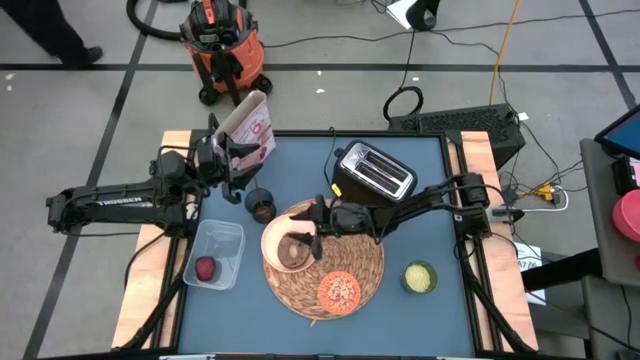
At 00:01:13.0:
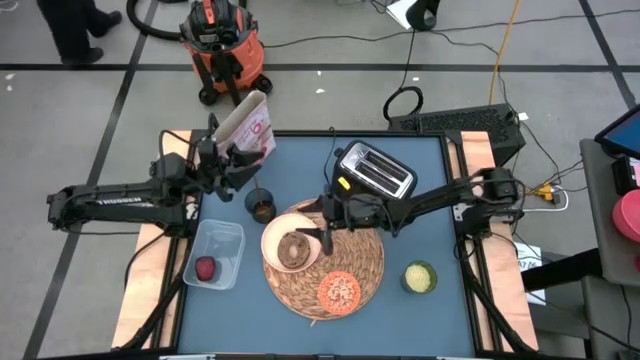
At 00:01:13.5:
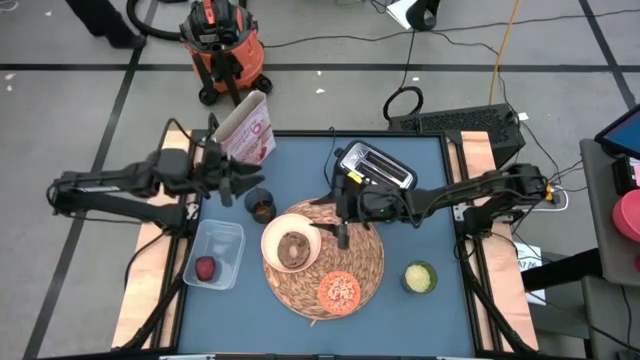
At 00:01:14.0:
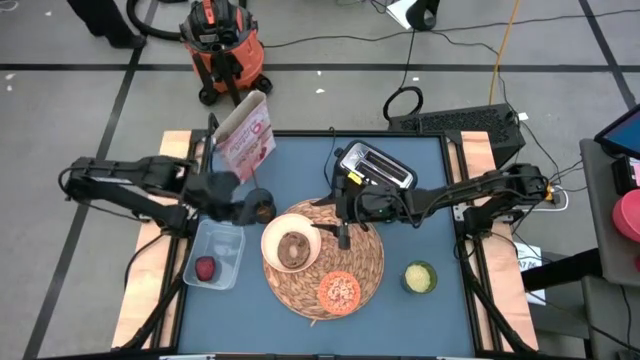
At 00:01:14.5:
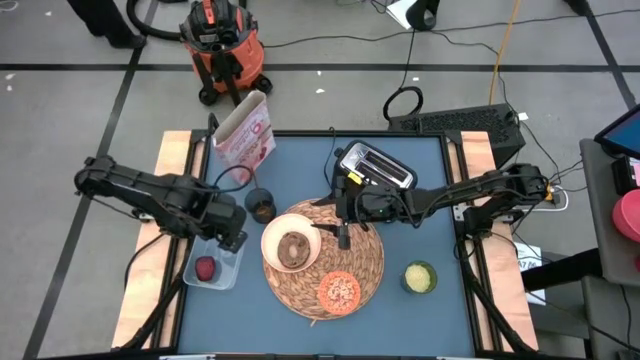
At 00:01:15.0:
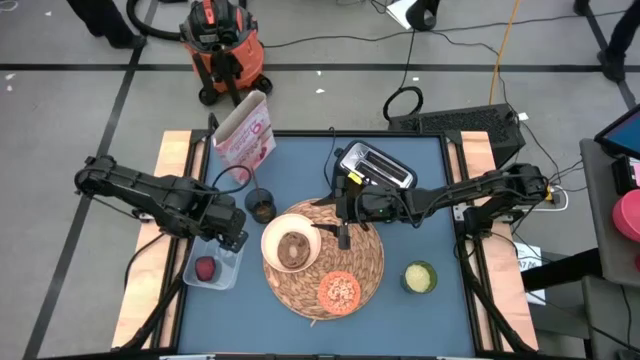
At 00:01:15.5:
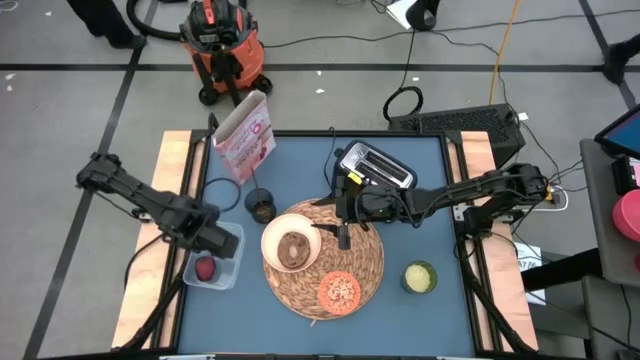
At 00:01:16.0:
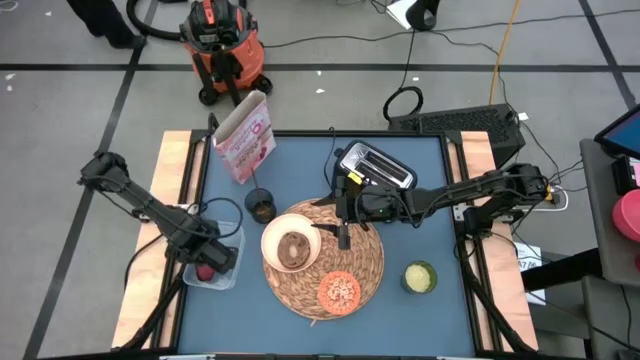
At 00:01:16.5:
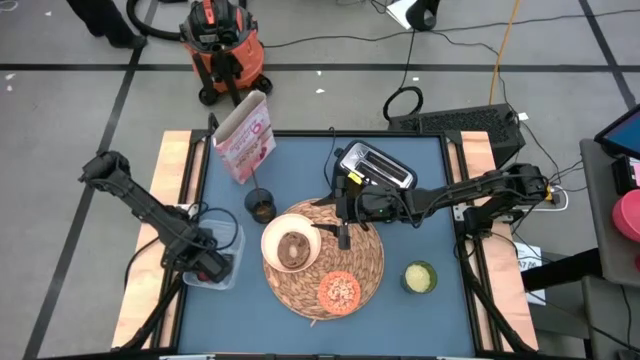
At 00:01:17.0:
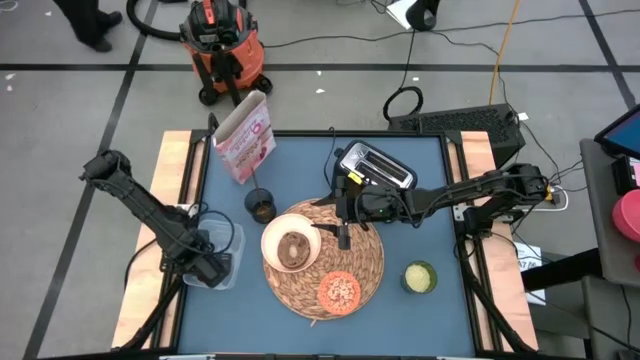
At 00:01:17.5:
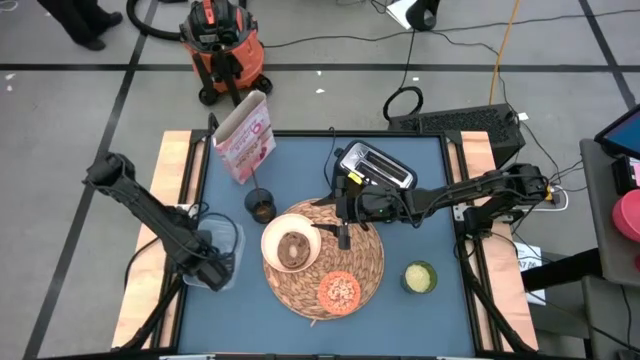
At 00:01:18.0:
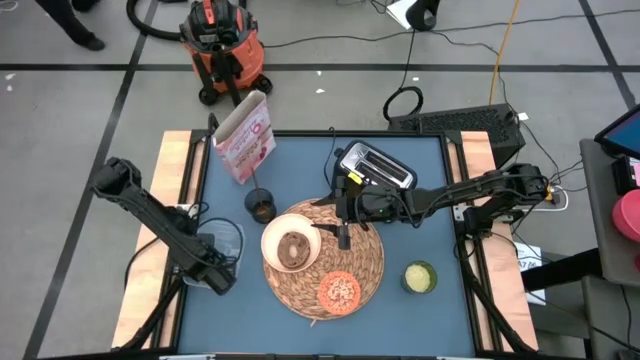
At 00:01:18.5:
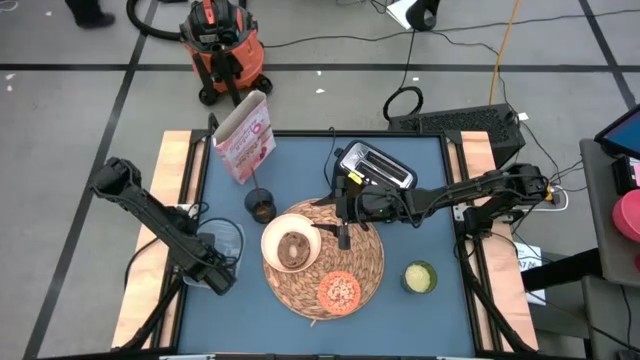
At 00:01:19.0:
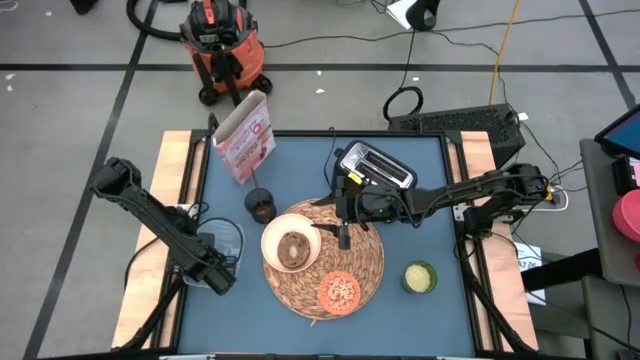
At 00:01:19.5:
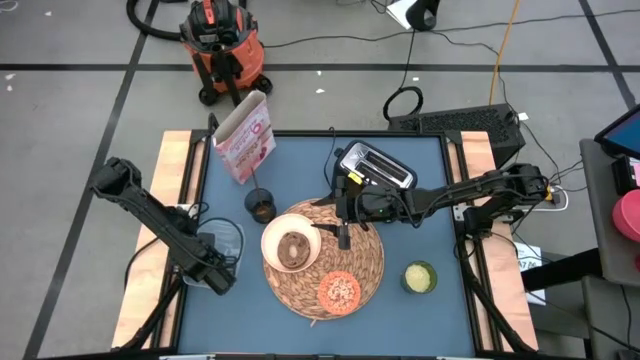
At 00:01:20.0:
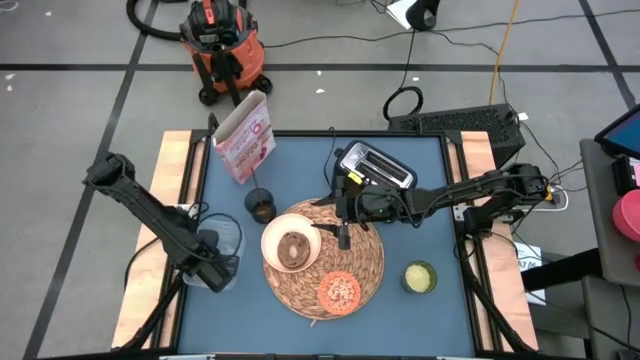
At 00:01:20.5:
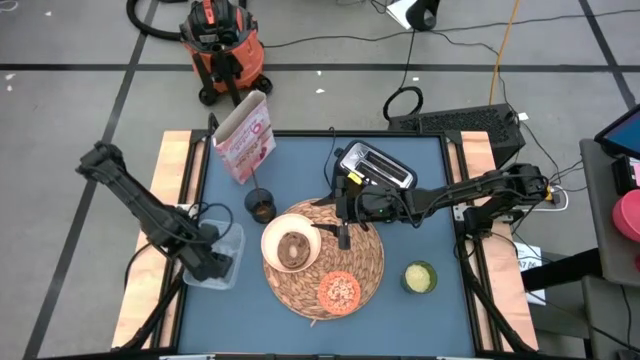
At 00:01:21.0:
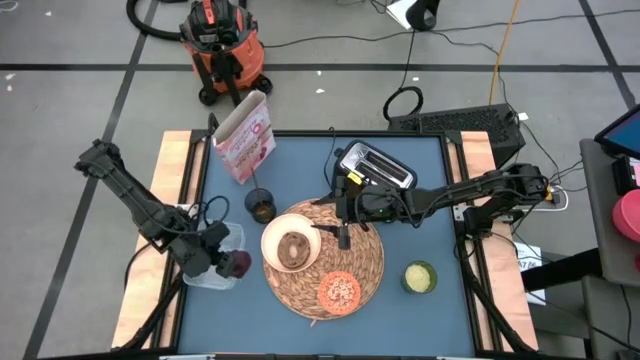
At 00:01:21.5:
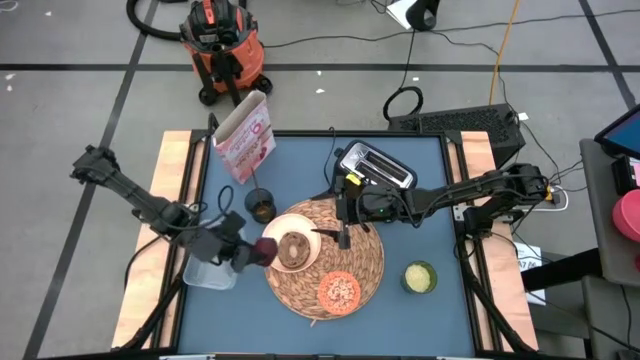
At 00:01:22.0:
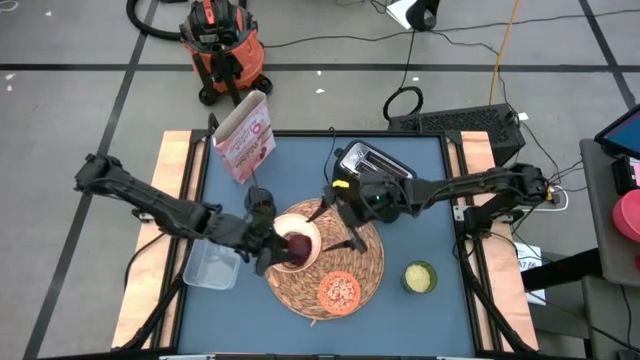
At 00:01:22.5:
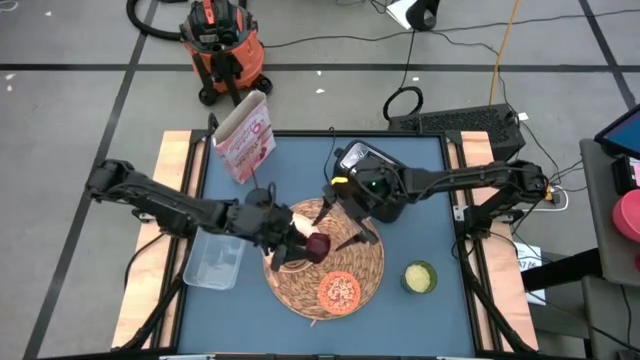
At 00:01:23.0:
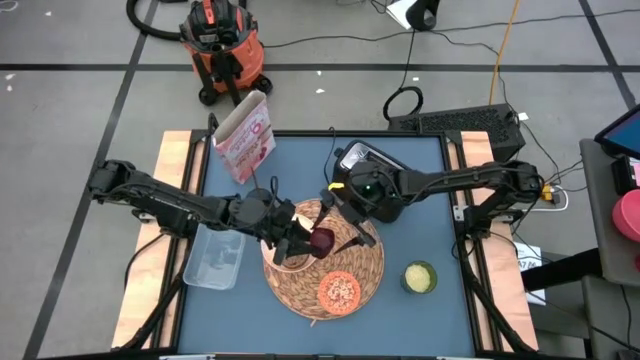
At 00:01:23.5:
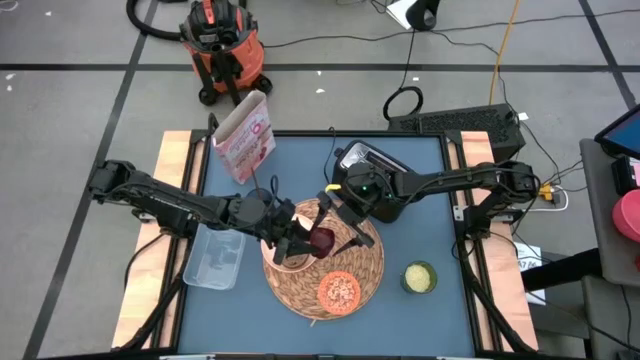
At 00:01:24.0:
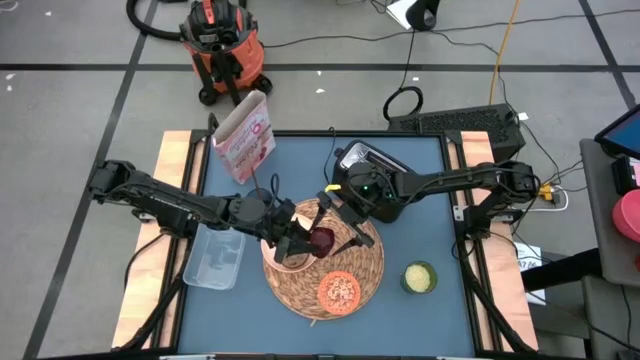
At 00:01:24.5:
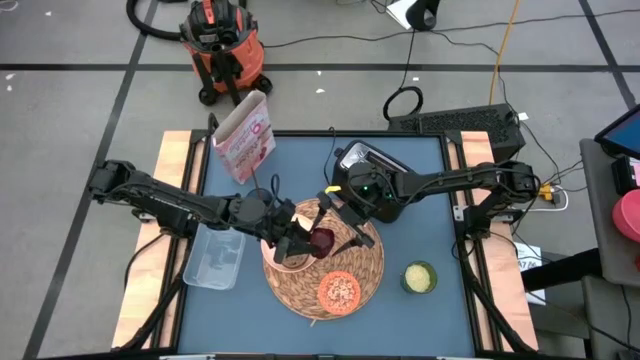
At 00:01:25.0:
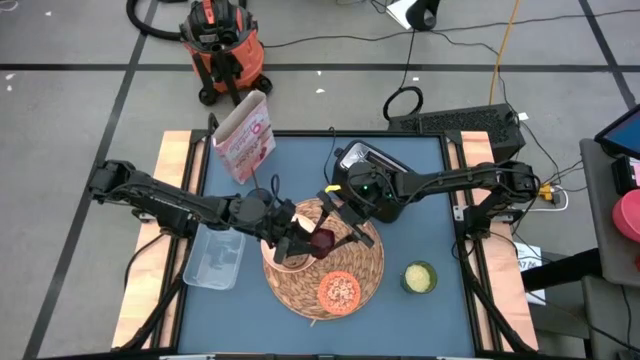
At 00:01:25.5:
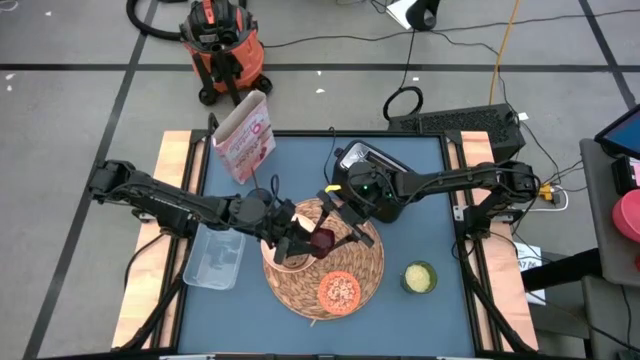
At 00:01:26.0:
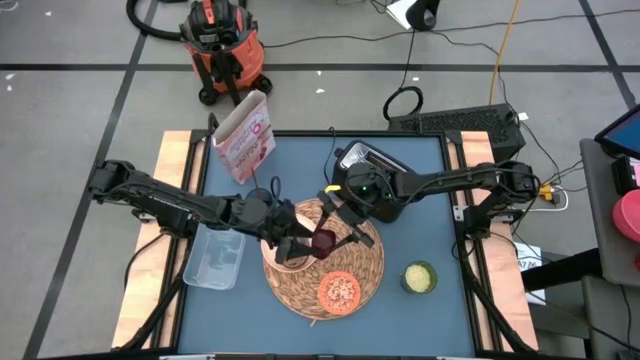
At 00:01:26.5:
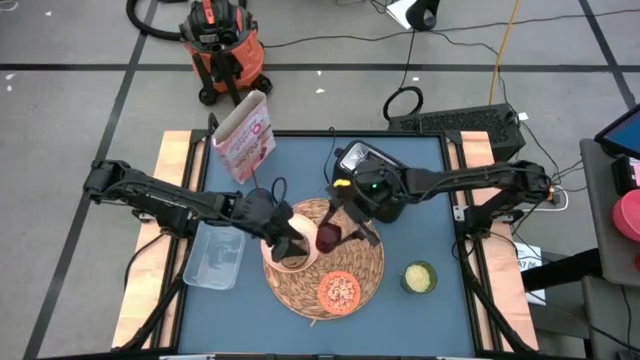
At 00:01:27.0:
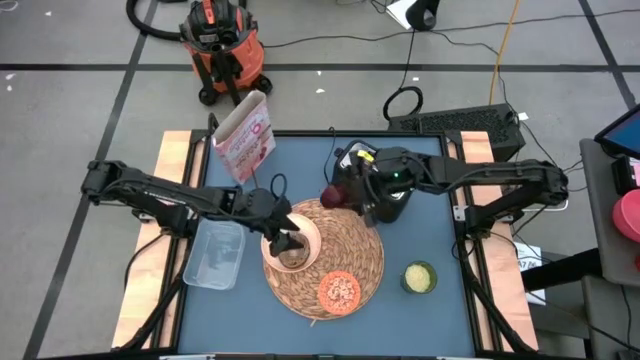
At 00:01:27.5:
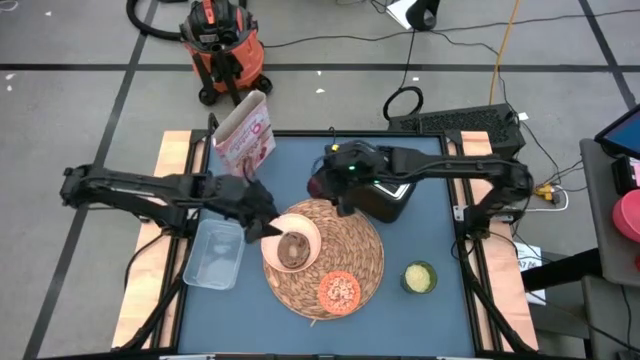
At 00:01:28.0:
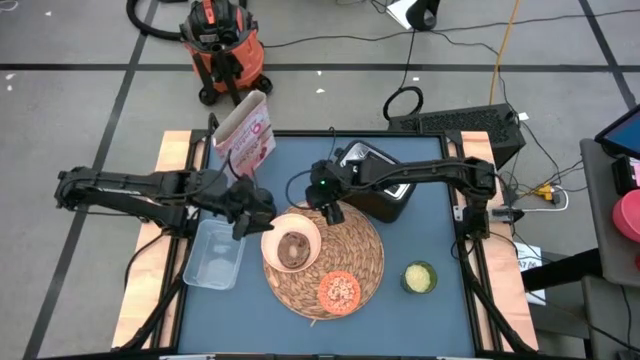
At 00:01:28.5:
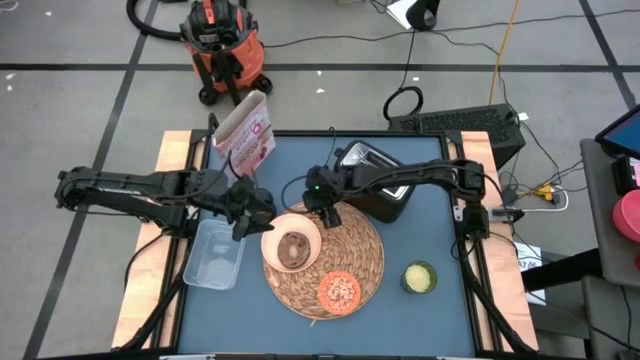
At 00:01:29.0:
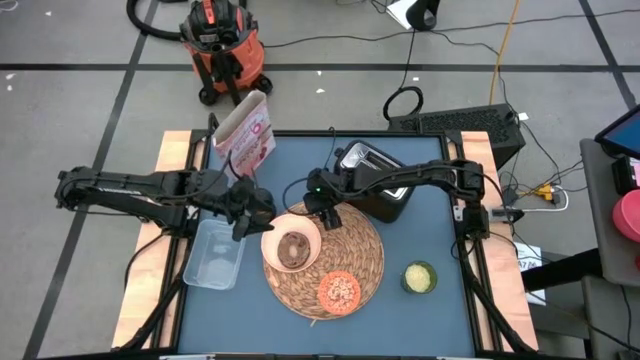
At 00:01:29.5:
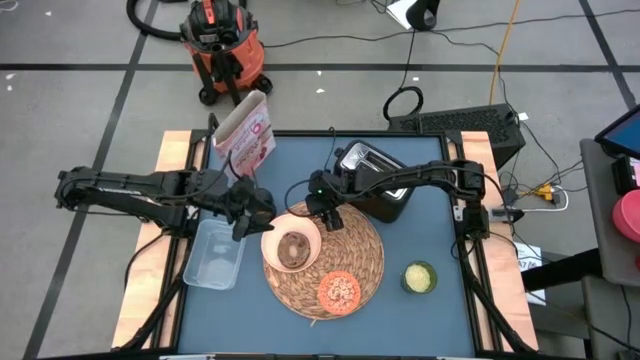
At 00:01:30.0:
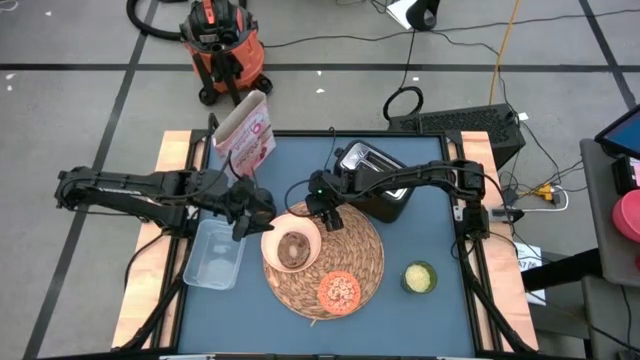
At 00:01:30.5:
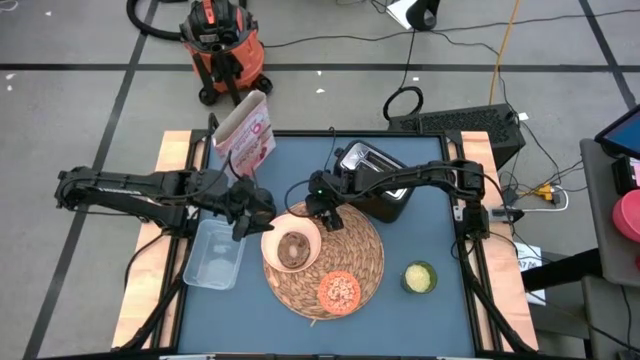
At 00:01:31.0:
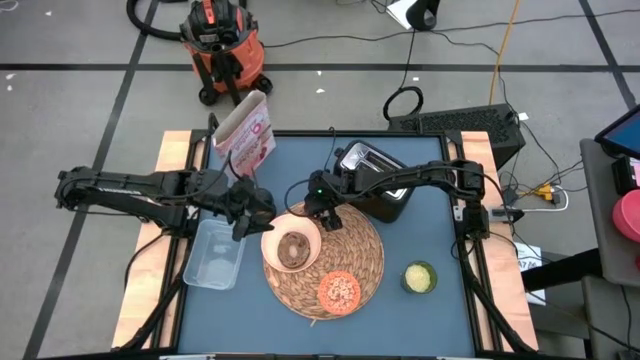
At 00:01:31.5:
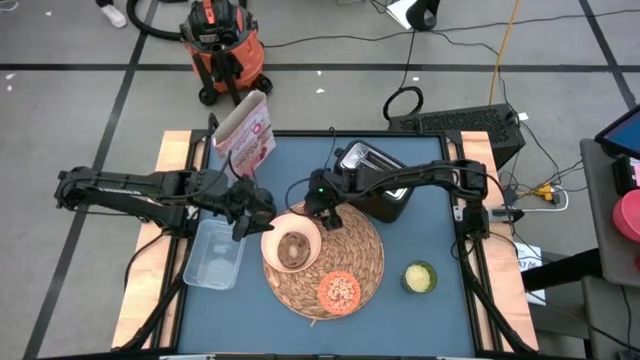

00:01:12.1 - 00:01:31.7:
Task: Arrange a breakfast setting
Put the red apple on the top left of the placemat
